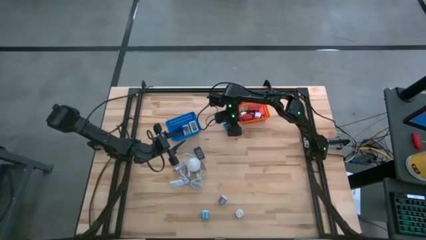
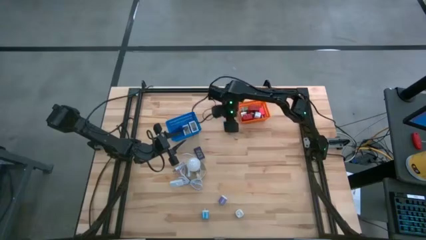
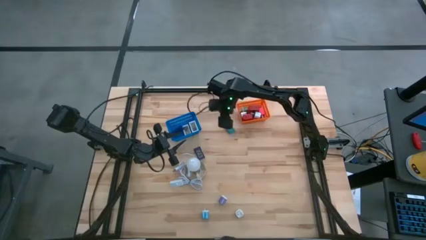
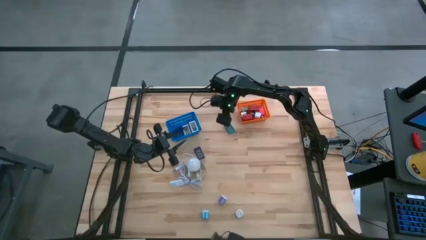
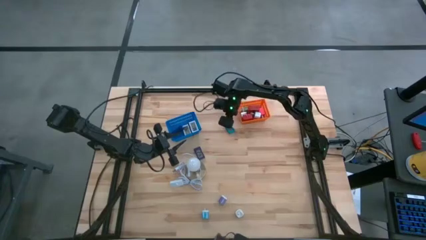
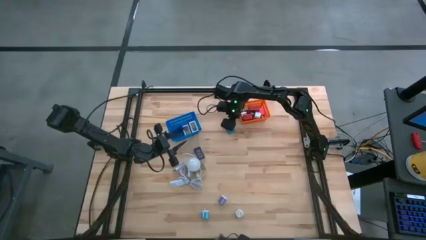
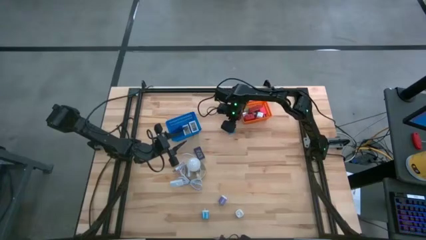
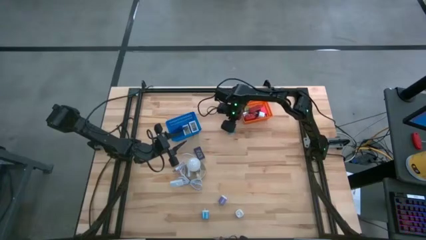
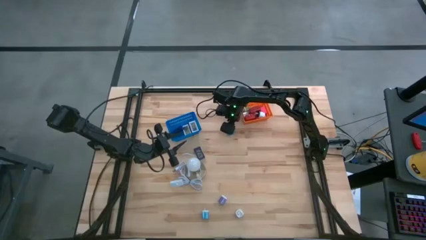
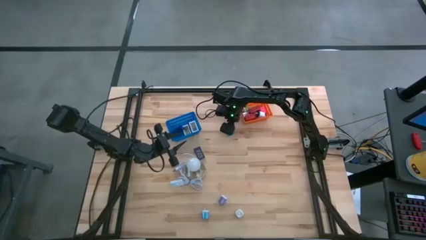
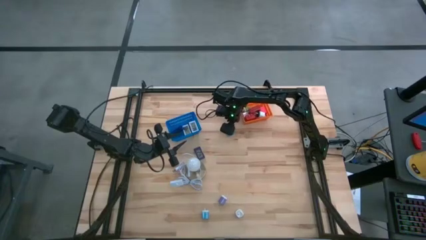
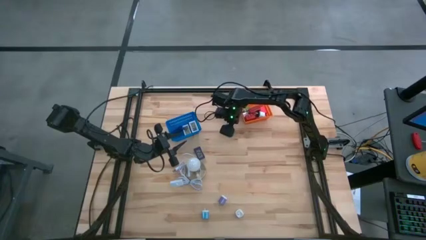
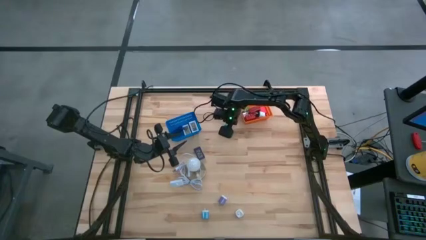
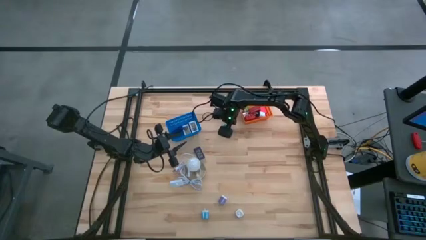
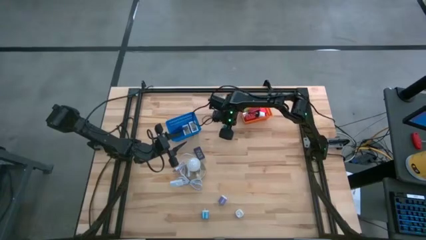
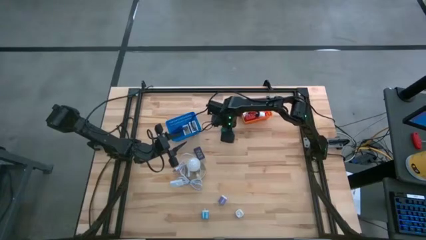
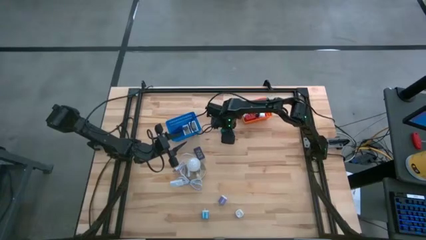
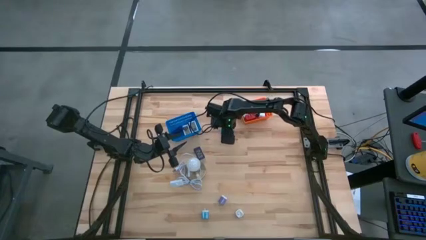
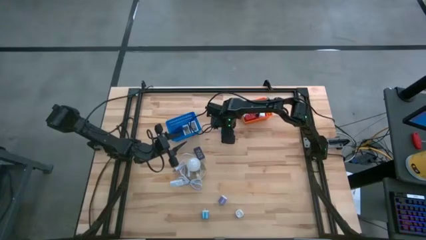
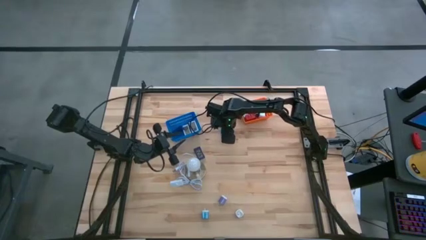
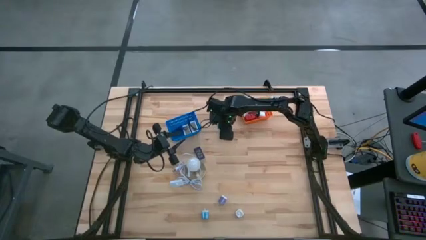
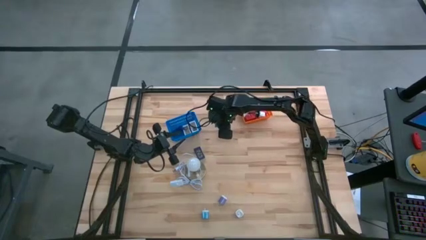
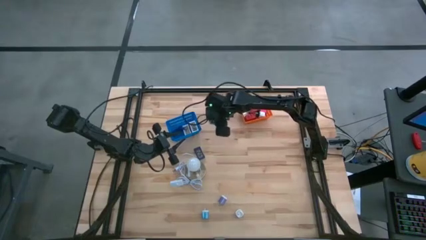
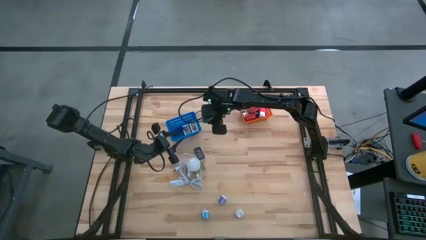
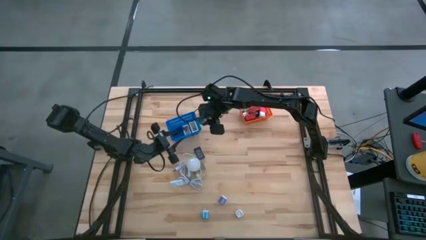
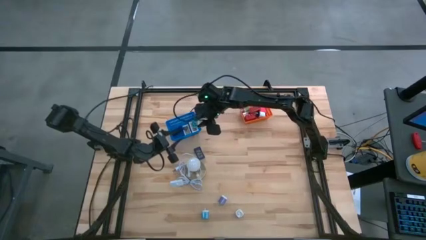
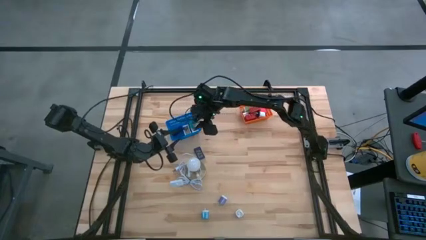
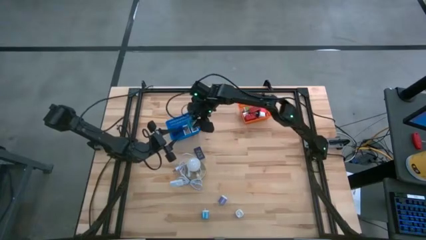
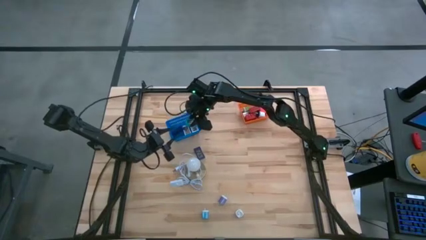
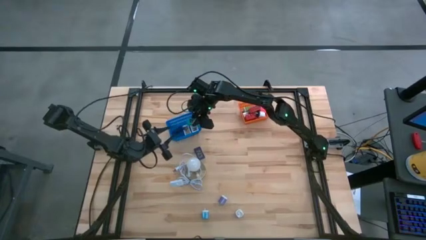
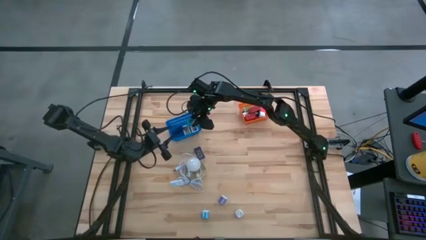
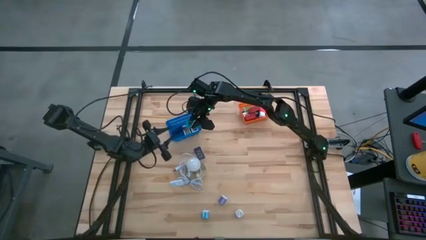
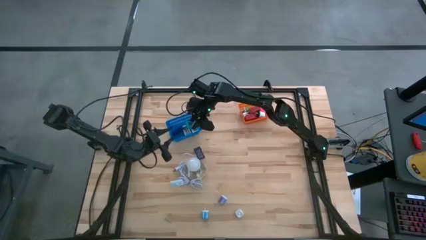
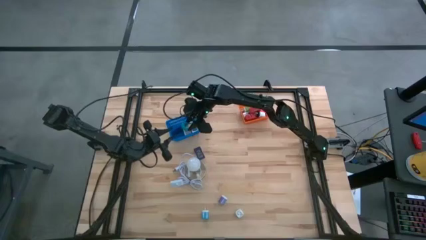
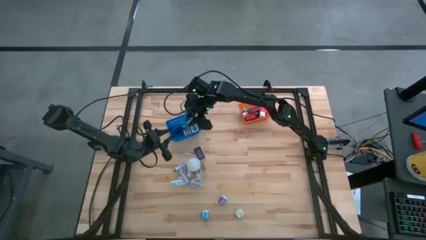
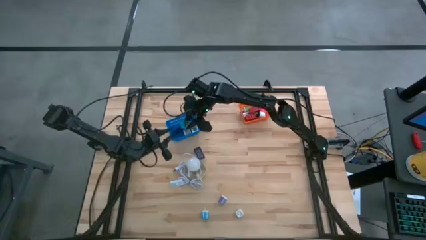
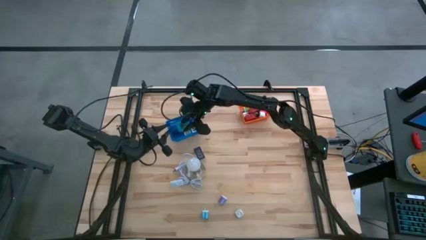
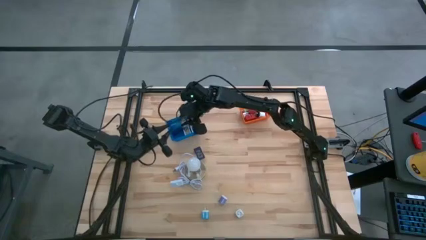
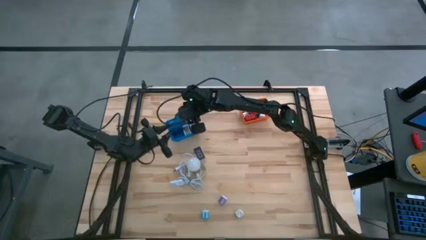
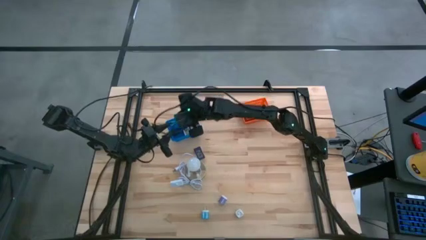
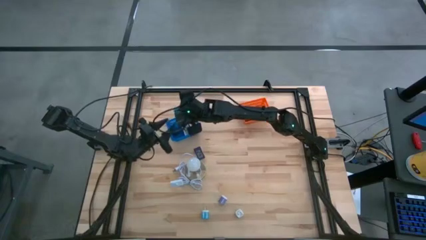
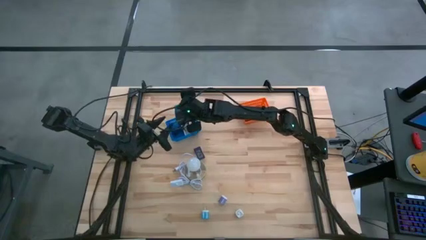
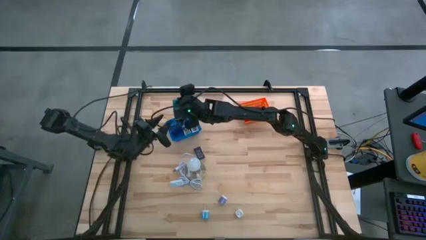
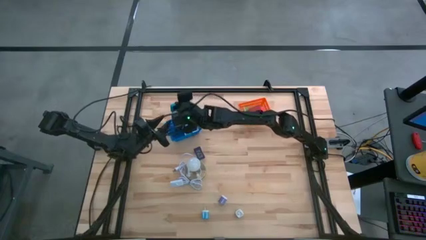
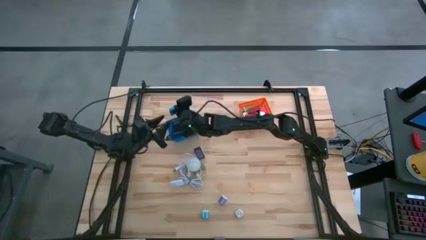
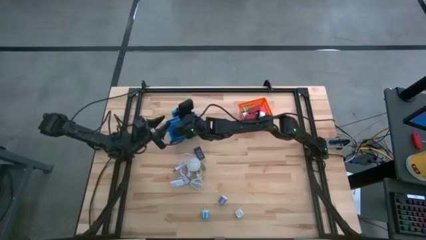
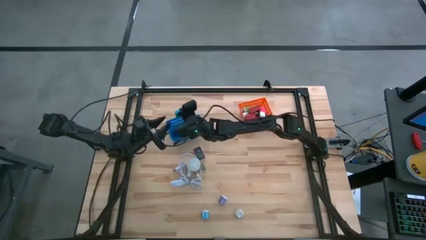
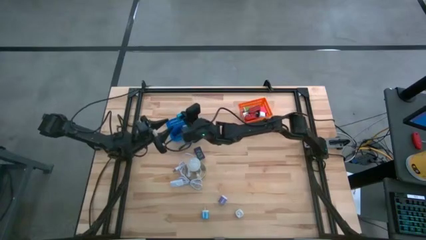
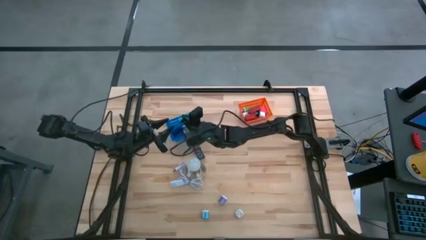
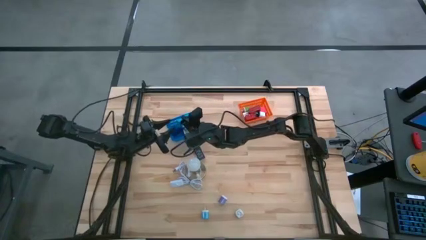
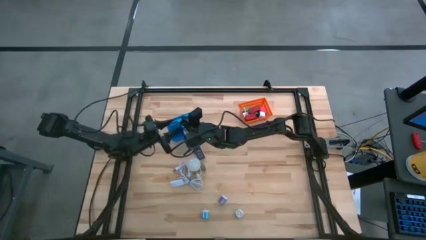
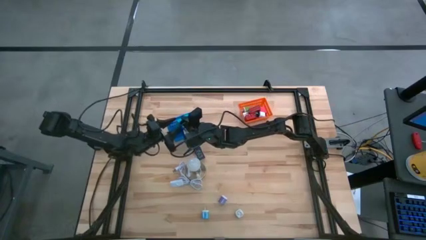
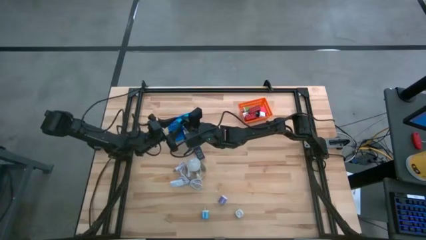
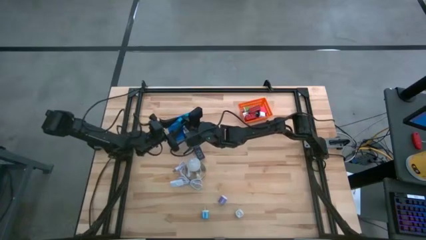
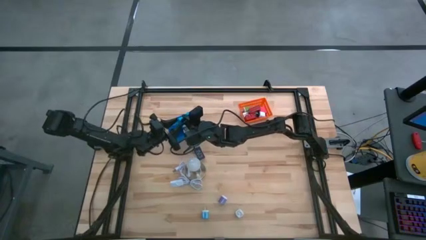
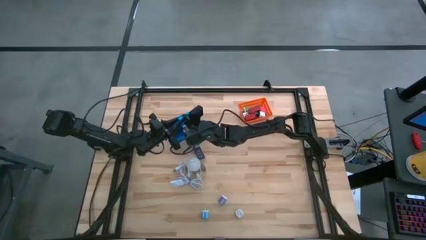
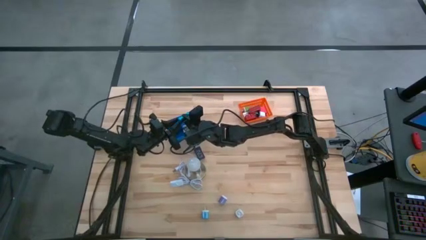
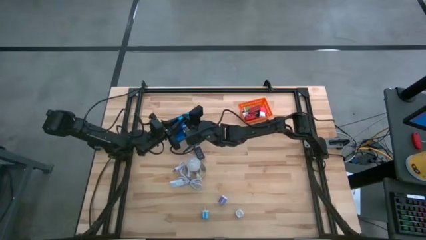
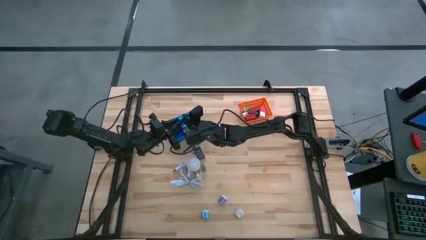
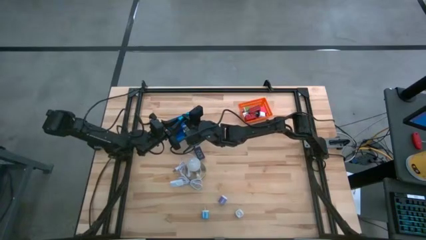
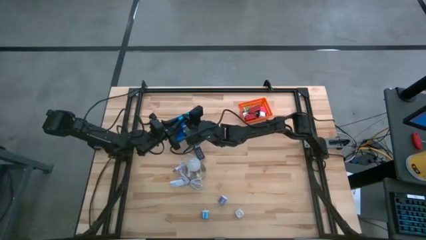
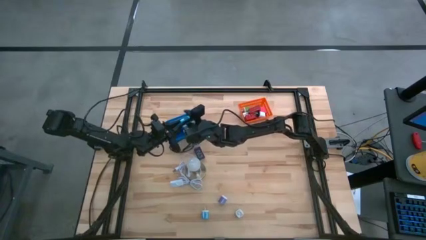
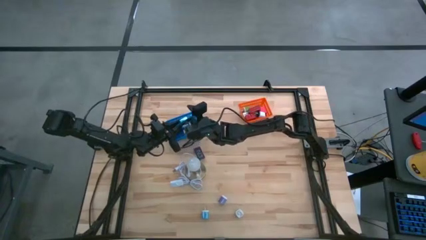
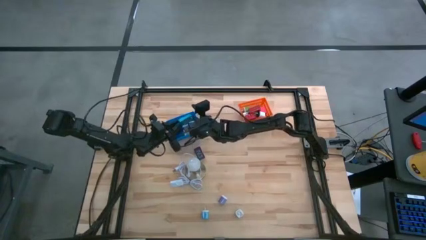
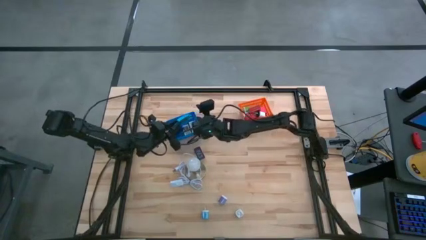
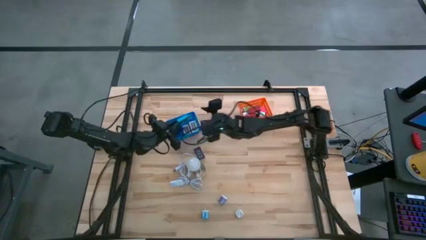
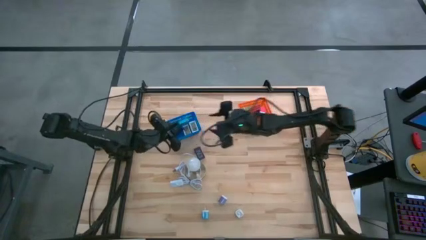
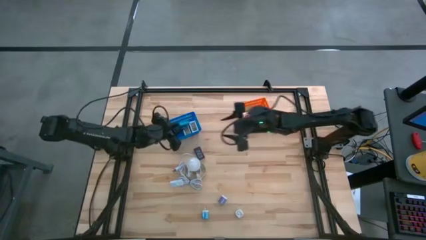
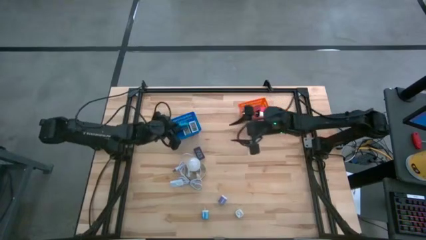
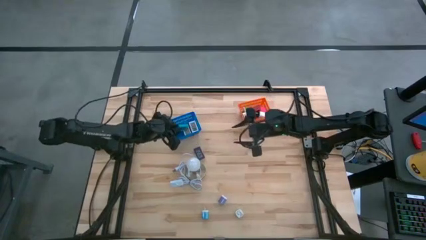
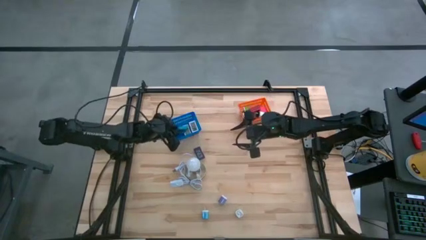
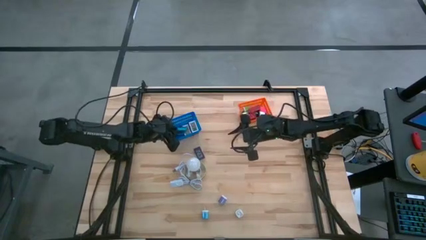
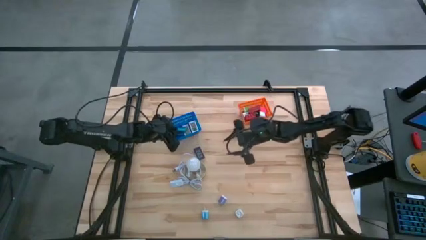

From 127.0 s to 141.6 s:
Task: Pick & Place Office items
Put the light blue timer into the blue bin

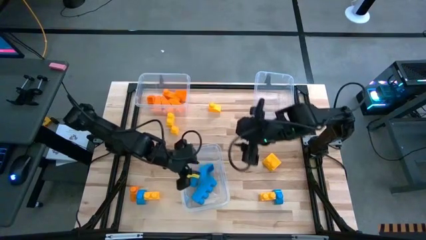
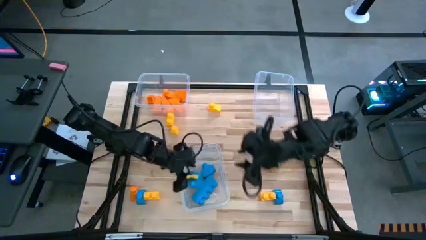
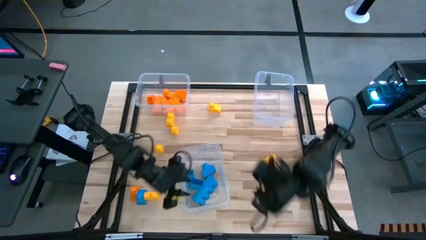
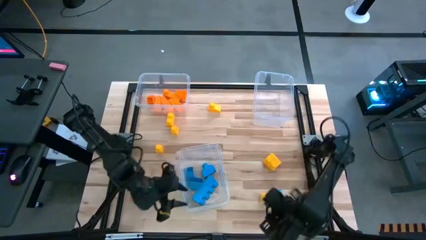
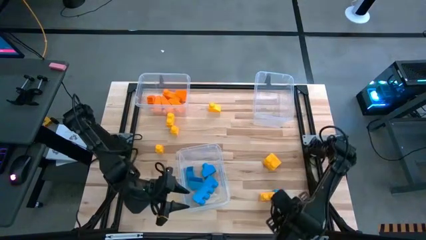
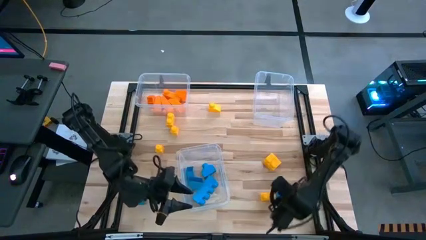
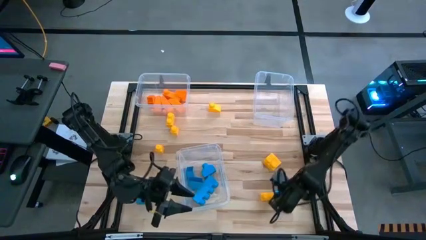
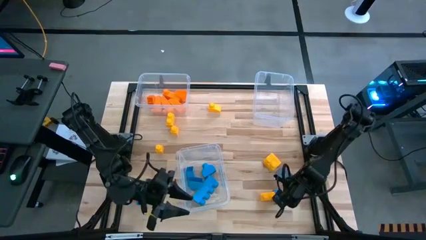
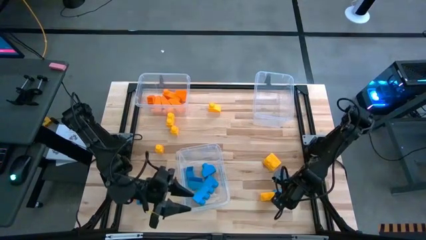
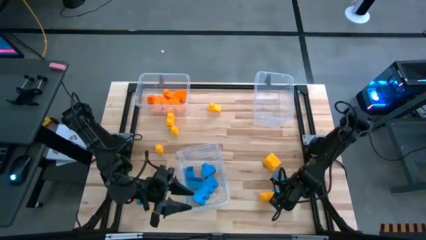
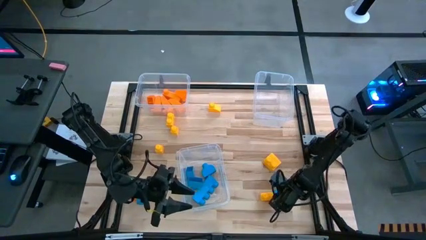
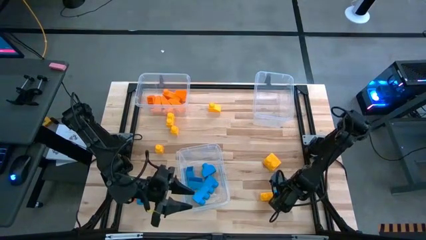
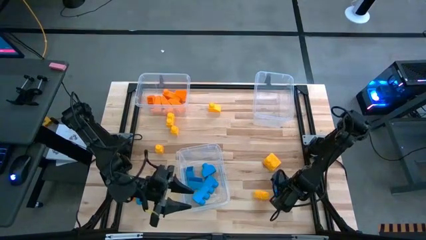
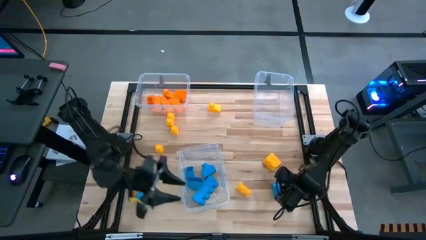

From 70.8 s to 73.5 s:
Task: Sort blocks
Put the blue game piece into the bottom transparent bin
